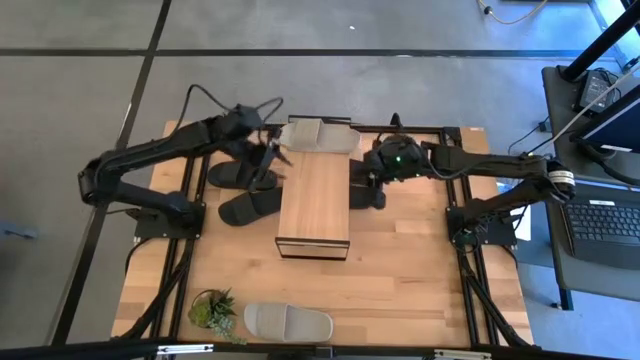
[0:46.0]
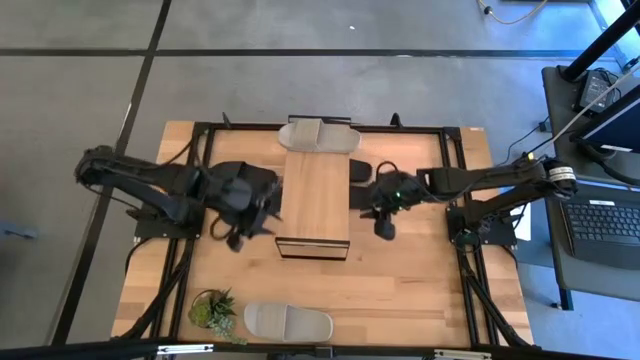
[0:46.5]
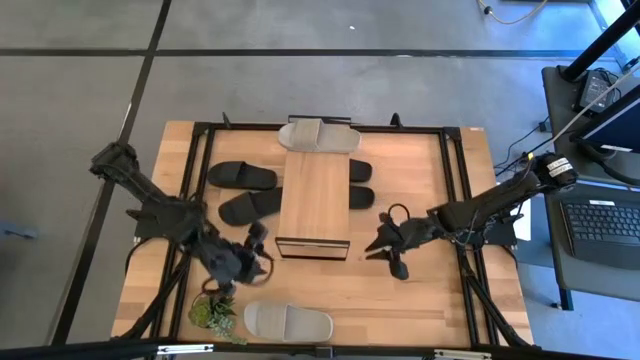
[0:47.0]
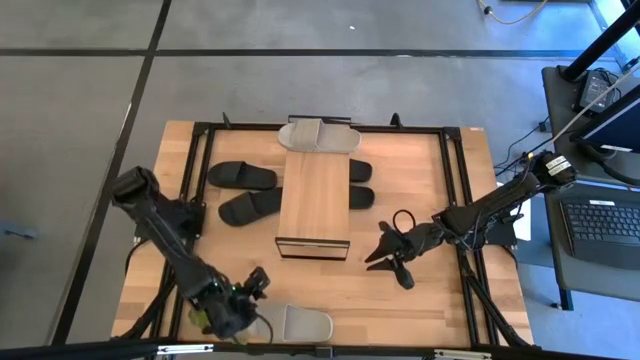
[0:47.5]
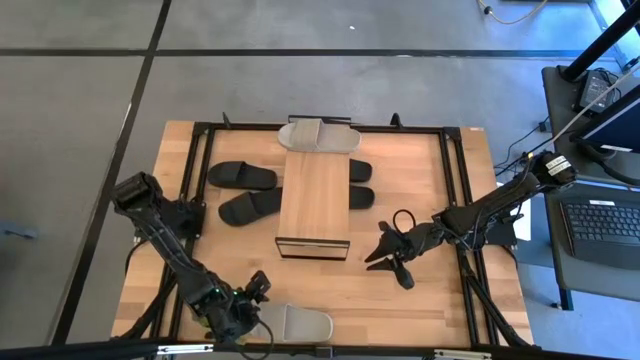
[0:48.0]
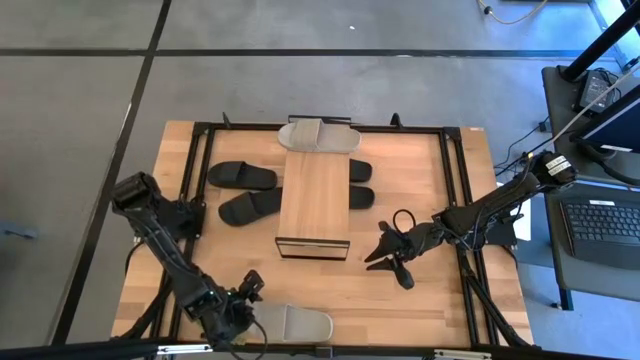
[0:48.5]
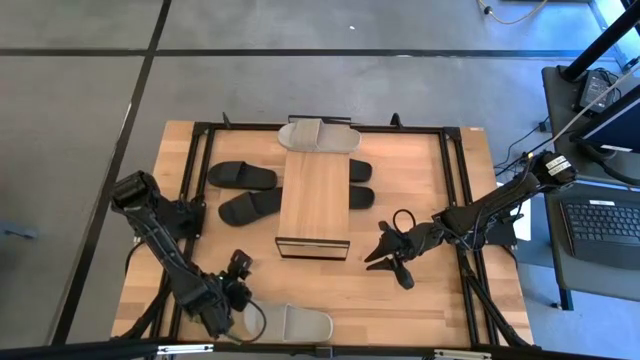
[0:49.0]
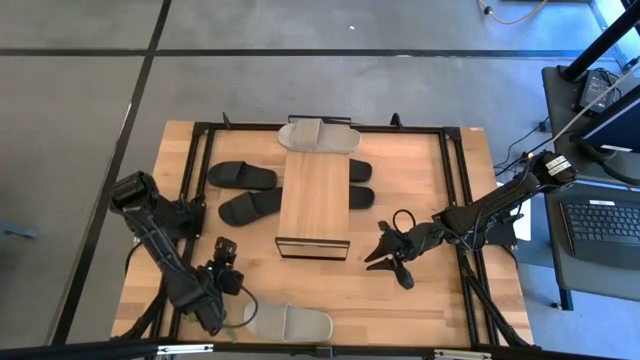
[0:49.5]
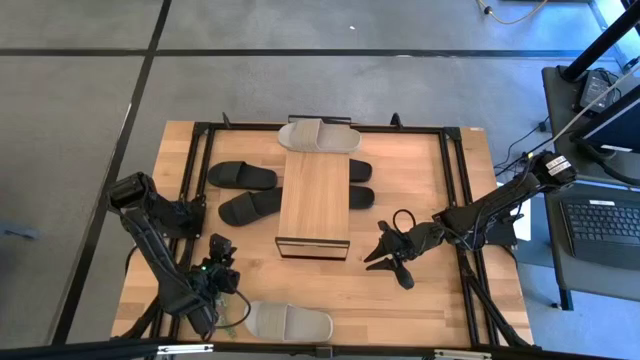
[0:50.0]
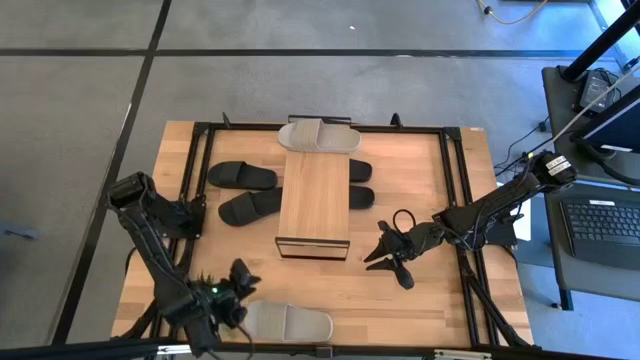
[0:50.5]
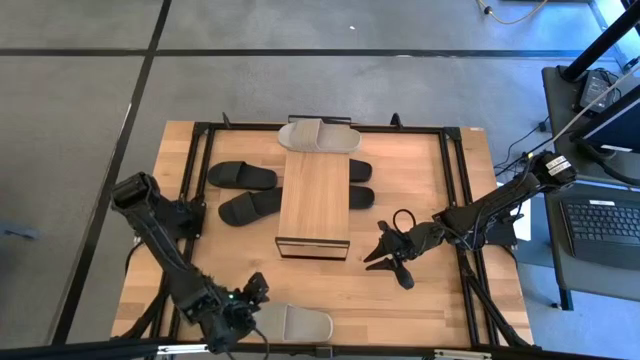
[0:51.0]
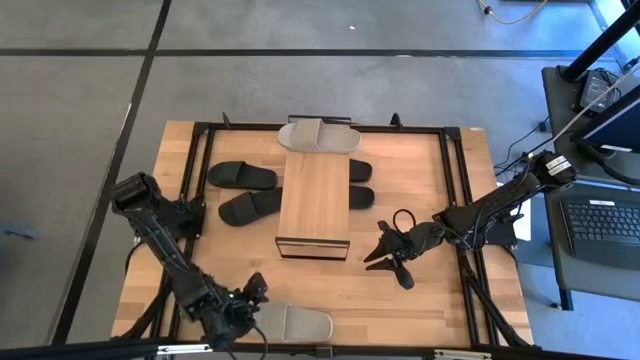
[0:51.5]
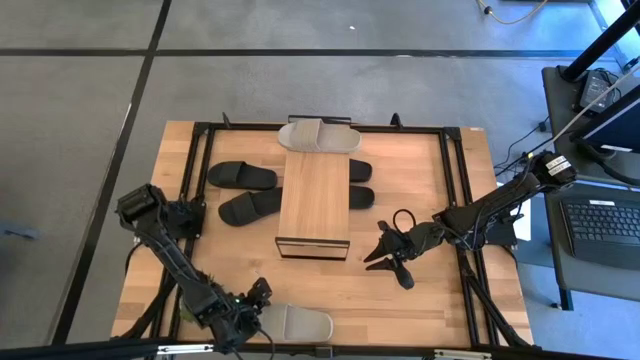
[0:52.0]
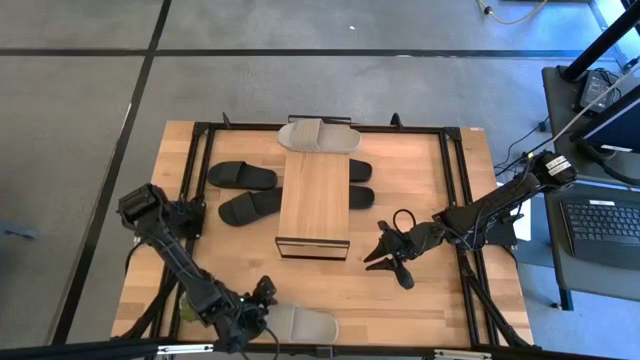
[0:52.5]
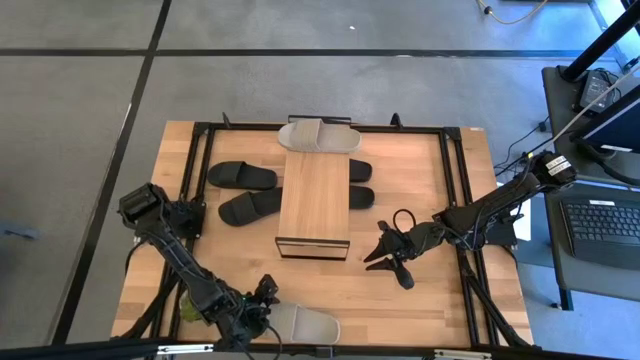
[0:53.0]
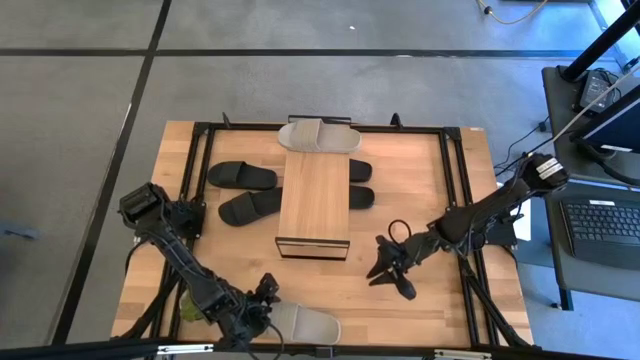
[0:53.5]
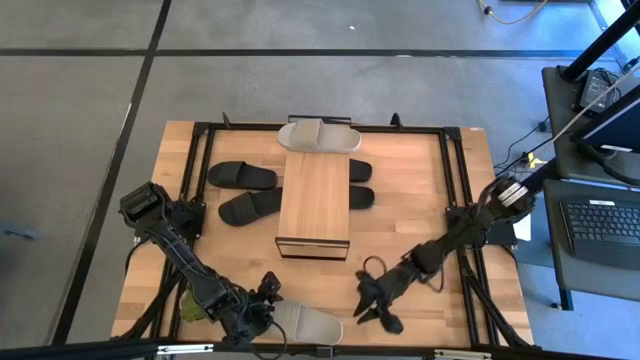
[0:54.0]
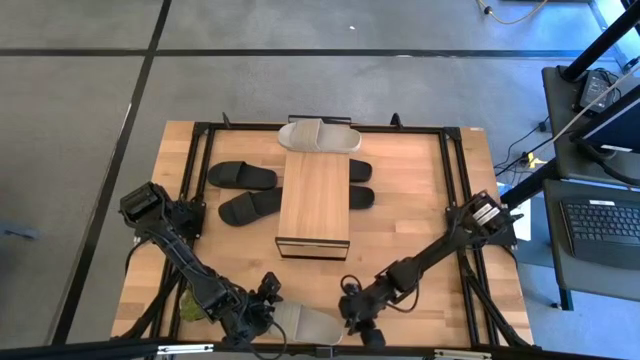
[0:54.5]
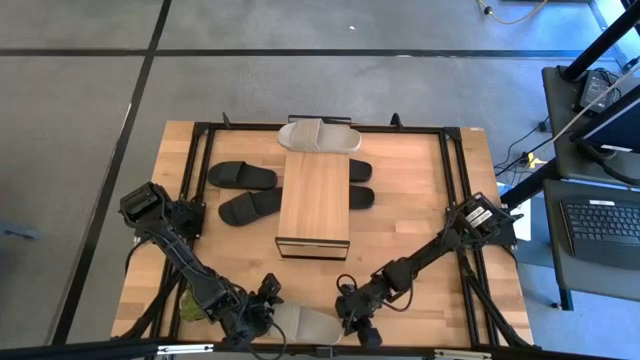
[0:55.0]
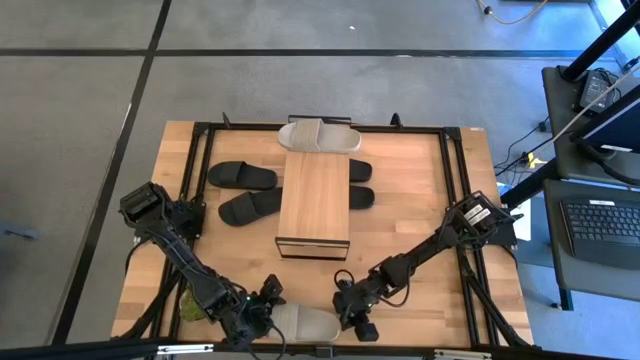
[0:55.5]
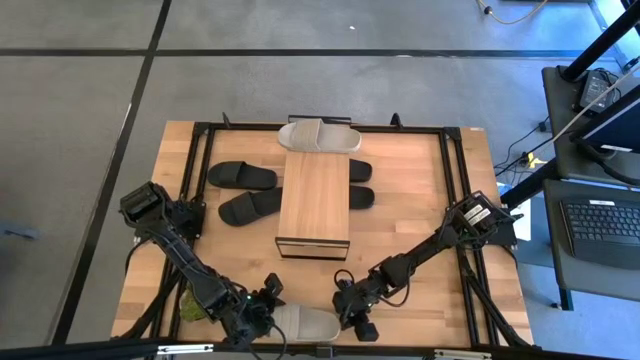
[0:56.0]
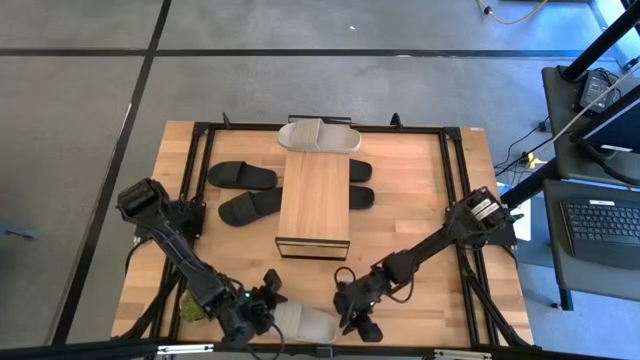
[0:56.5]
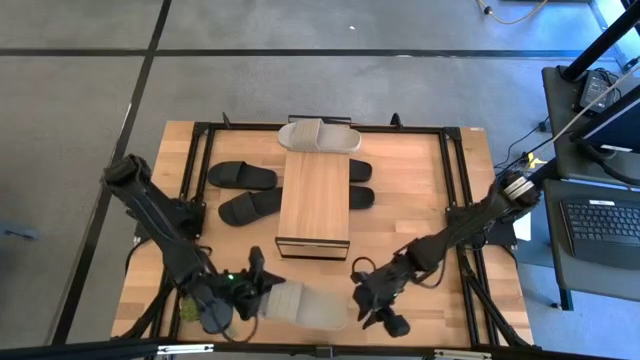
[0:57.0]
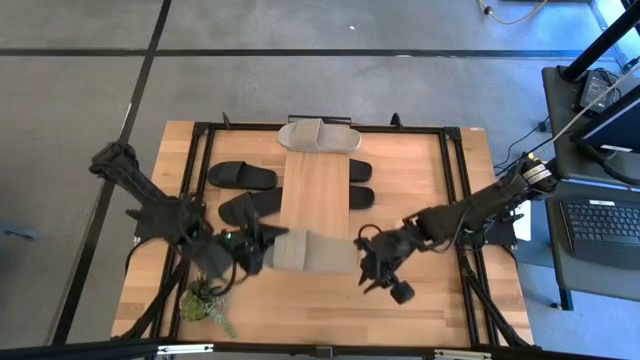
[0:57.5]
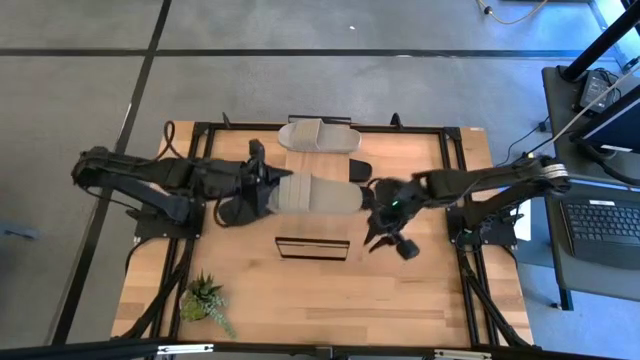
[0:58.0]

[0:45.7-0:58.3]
Task: Pick and place slides into the shelf
Put the gray slide on the shelf

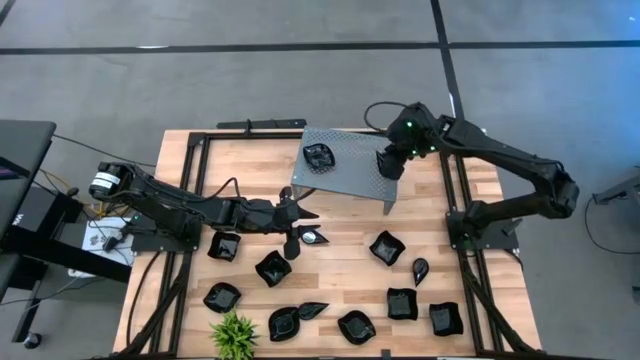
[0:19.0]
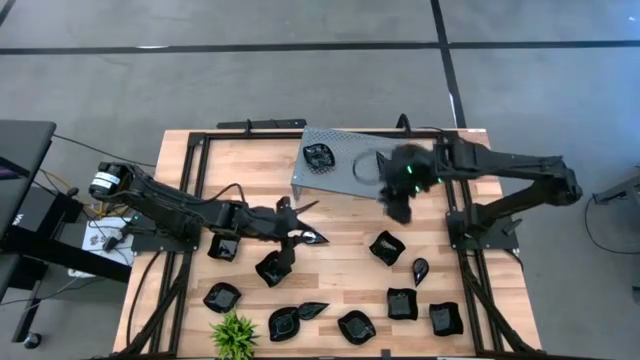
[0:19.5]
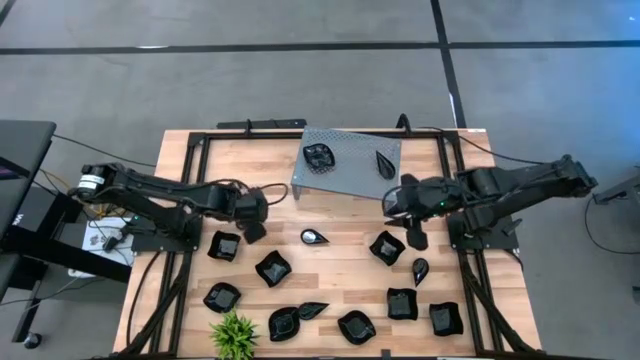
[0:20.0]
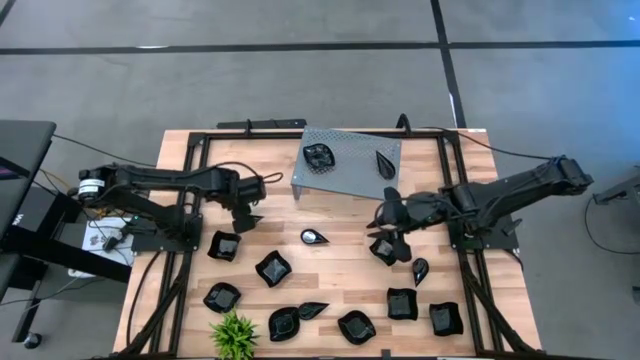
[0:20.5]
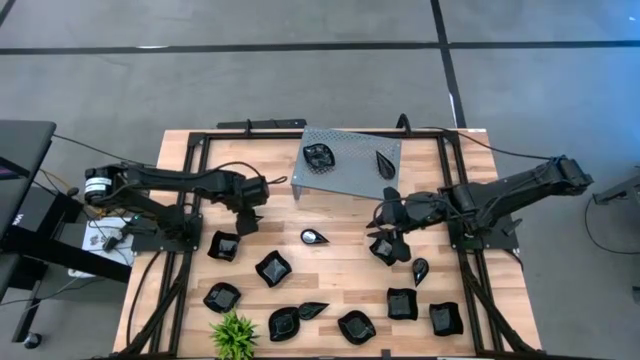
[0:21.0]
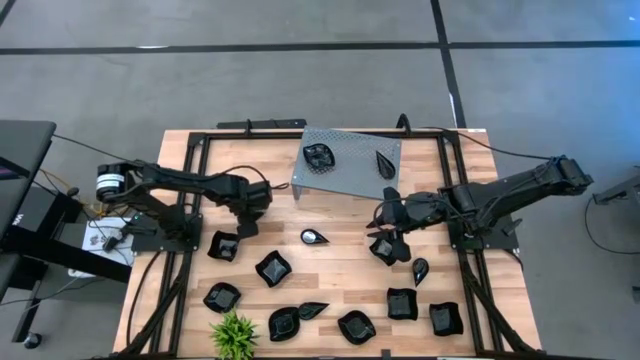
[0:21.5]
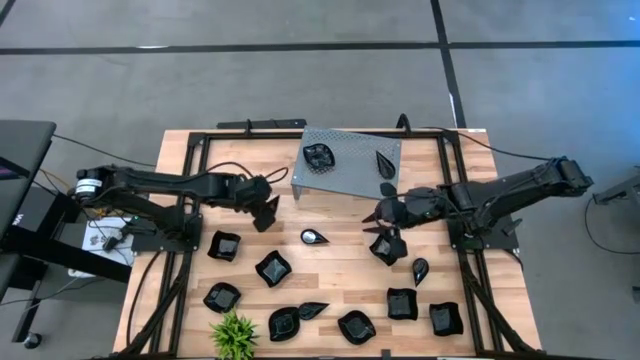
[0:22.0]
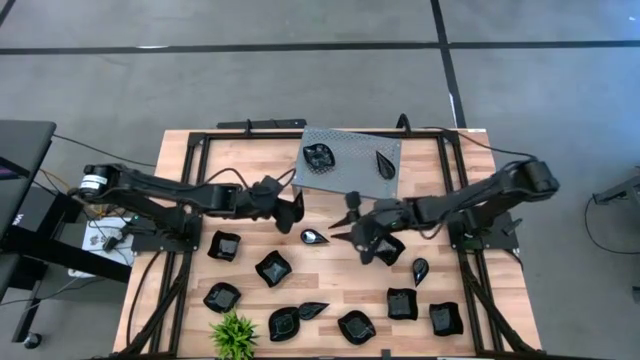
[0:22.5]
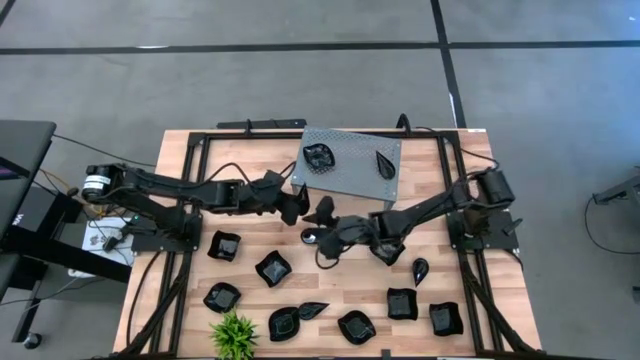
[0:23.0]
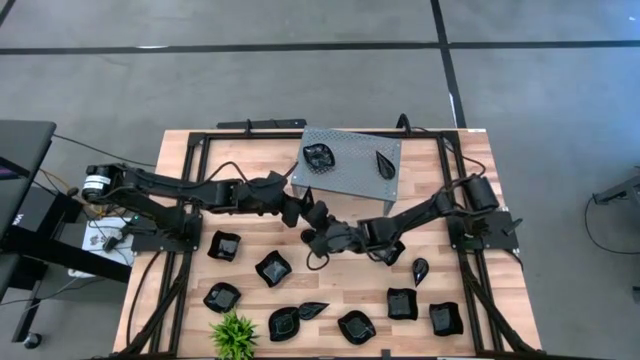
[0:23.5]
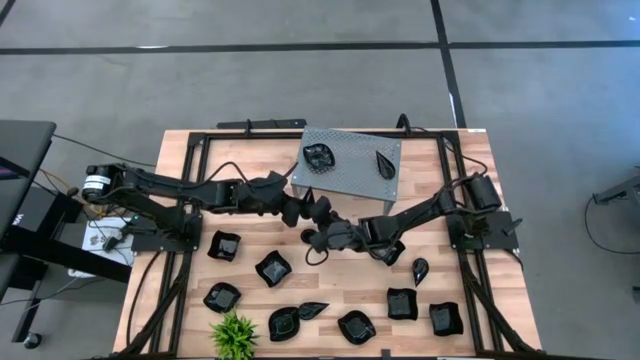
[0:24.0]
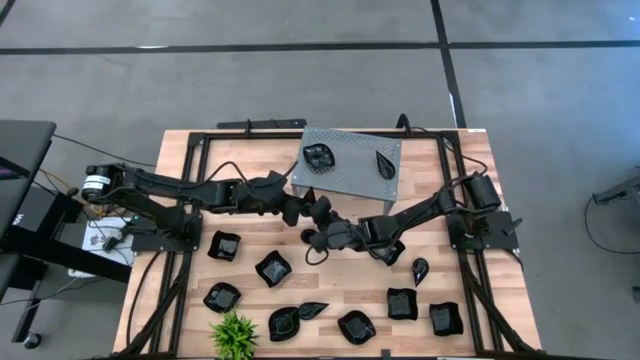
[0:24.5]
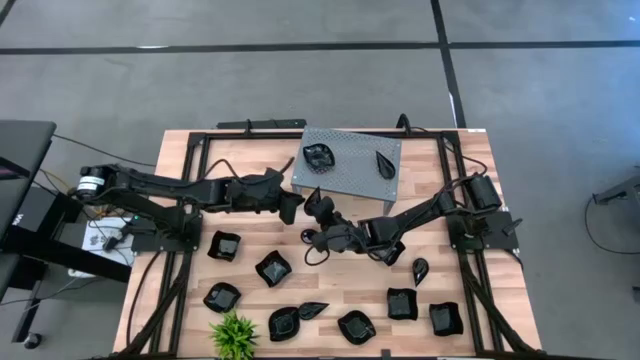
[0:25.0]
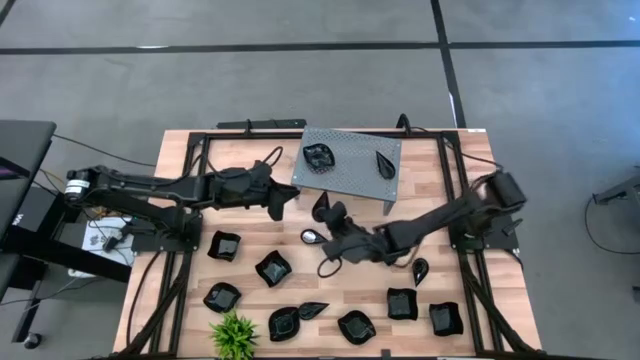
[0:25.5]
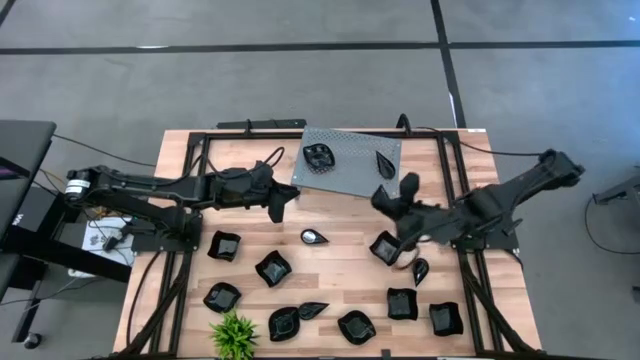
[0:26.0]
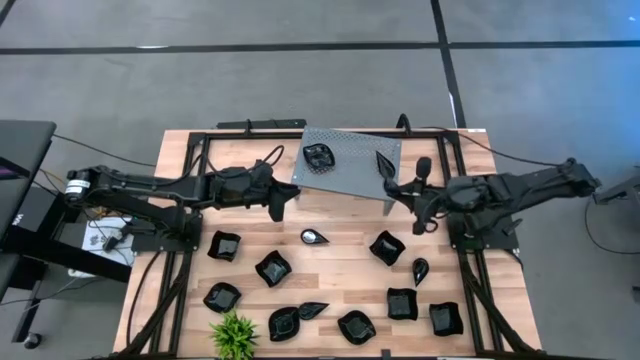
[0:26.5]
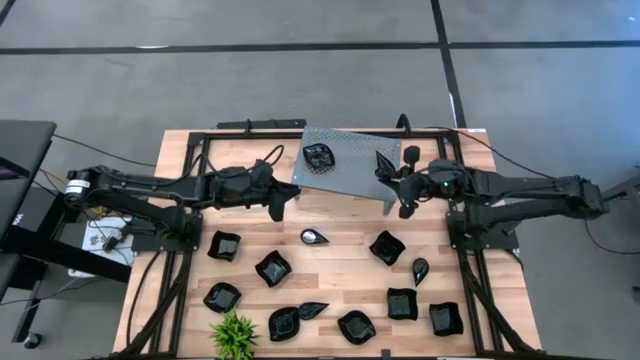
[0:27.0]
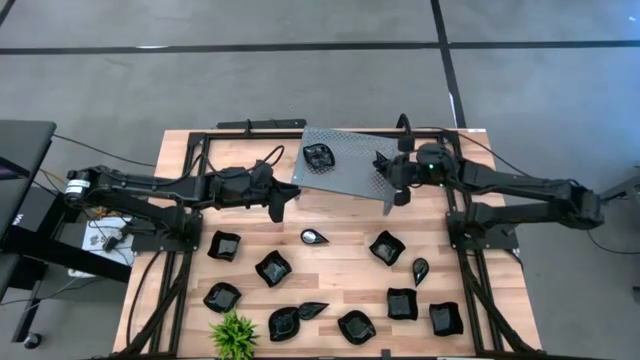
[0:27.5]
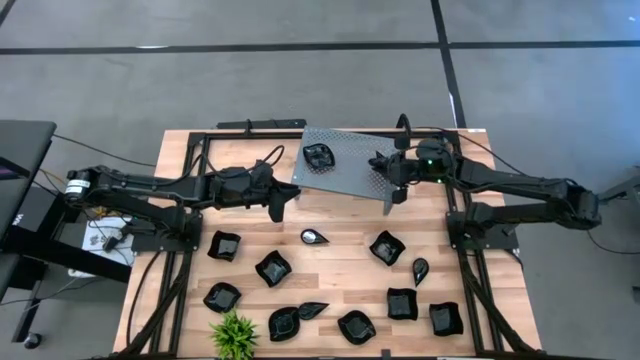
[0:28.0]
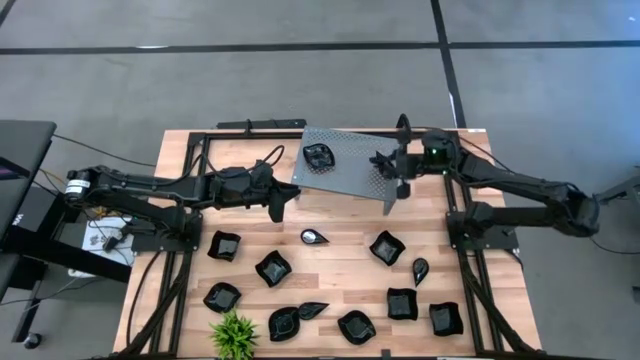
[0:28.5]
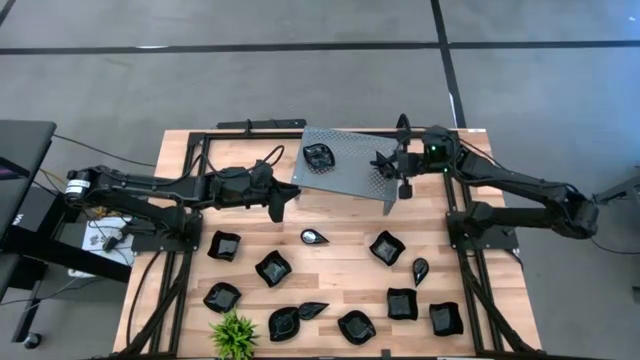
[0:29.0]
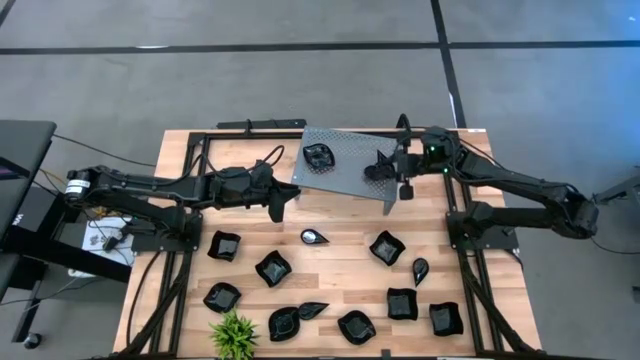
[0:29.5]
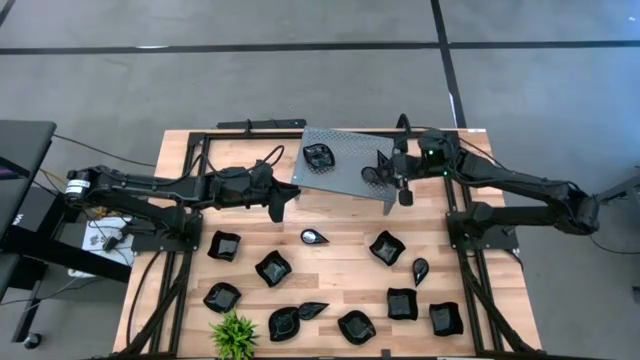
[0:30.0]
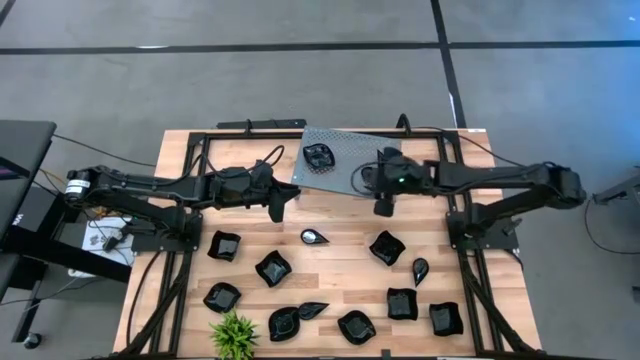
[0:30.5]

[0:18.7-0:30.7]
Task: Pick & Place Mini shaped plates
Stack the black drop-shaped plate on the other drop-shaped plate on the shelf
